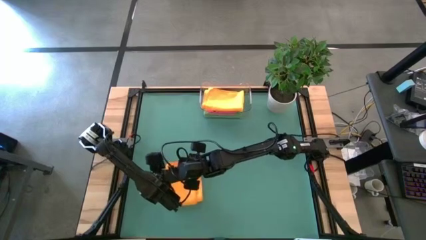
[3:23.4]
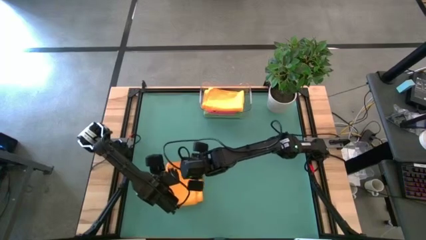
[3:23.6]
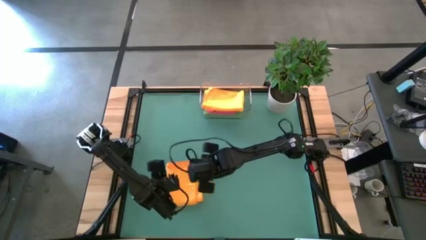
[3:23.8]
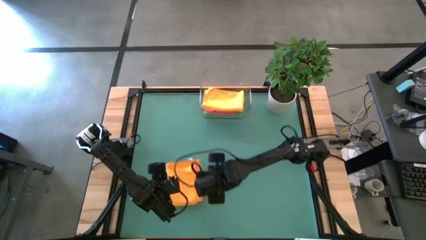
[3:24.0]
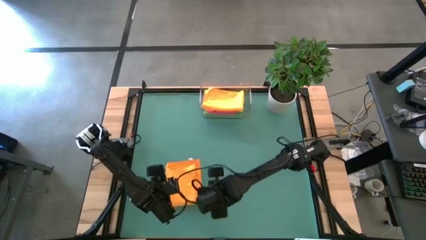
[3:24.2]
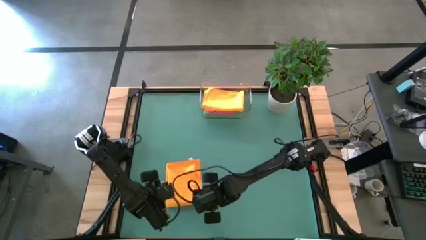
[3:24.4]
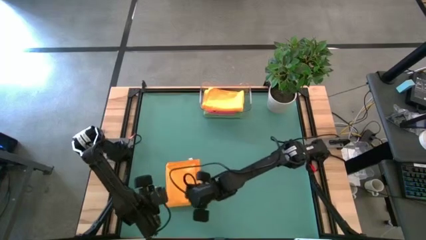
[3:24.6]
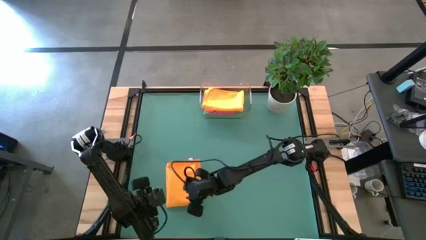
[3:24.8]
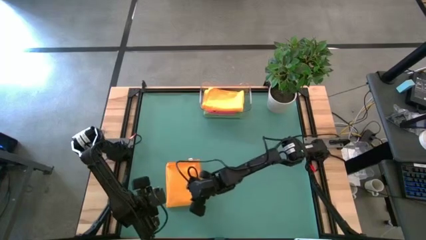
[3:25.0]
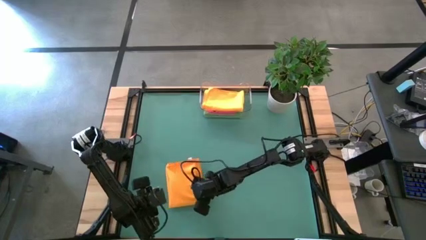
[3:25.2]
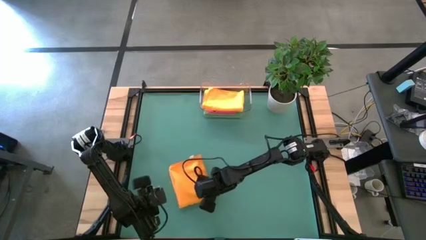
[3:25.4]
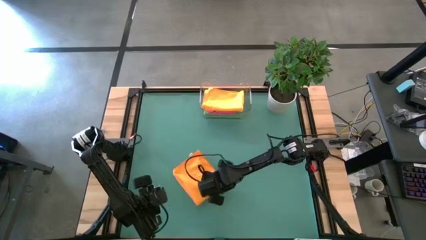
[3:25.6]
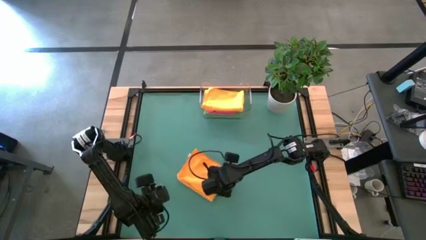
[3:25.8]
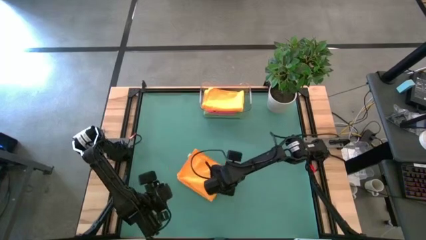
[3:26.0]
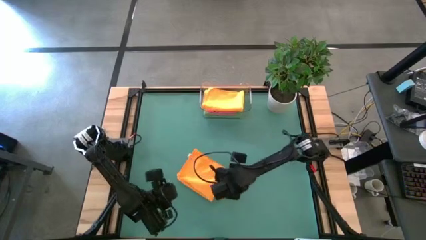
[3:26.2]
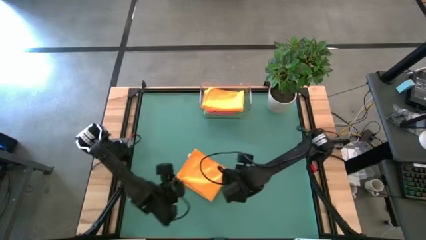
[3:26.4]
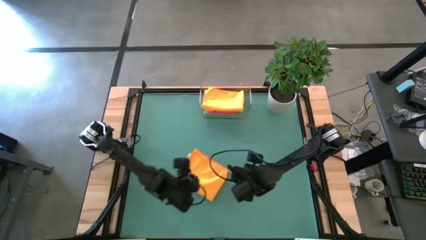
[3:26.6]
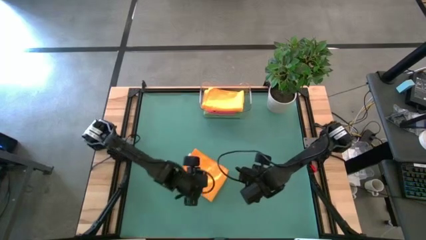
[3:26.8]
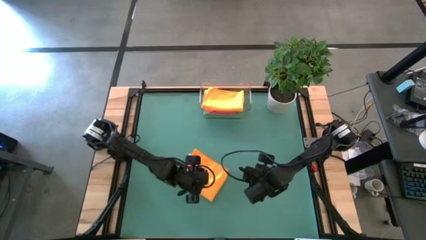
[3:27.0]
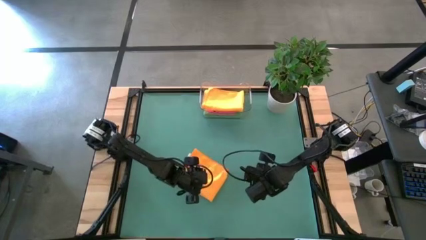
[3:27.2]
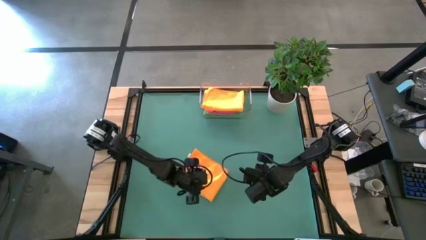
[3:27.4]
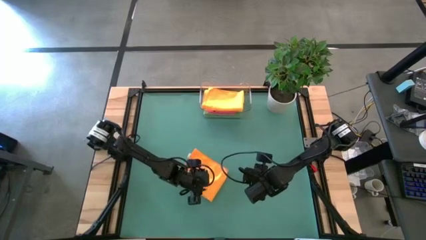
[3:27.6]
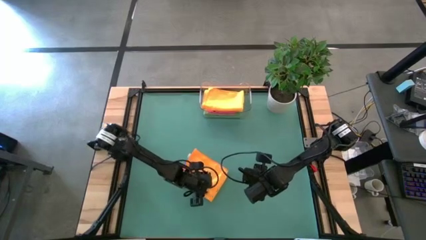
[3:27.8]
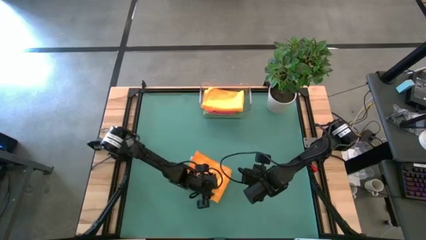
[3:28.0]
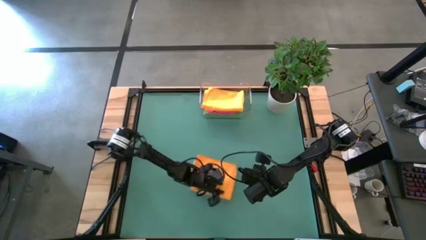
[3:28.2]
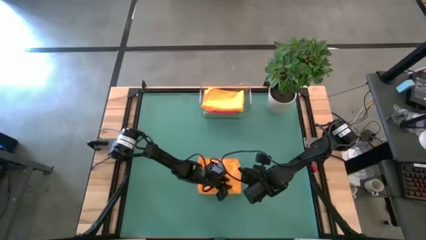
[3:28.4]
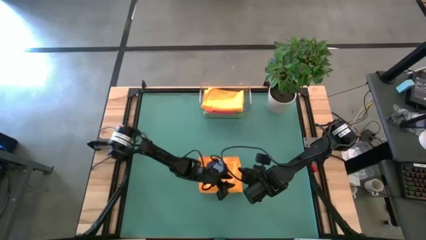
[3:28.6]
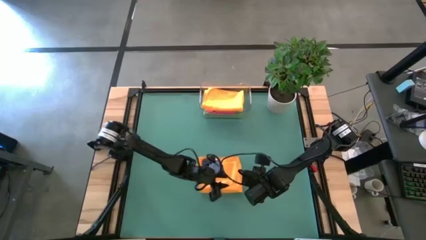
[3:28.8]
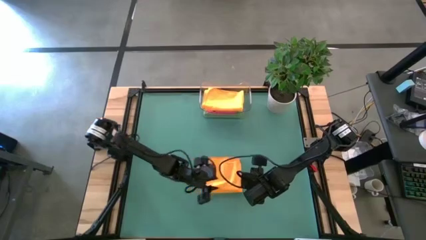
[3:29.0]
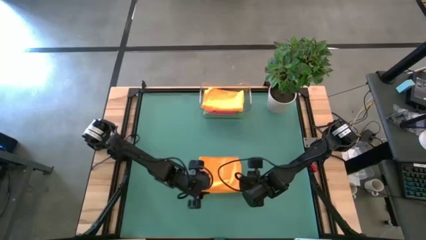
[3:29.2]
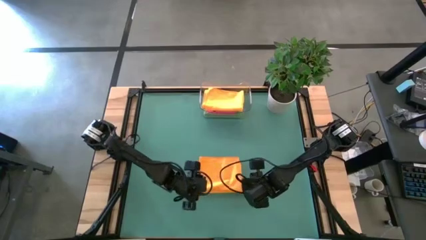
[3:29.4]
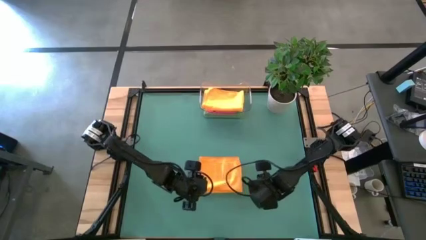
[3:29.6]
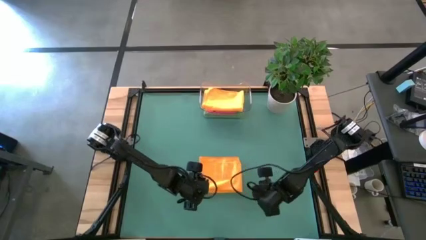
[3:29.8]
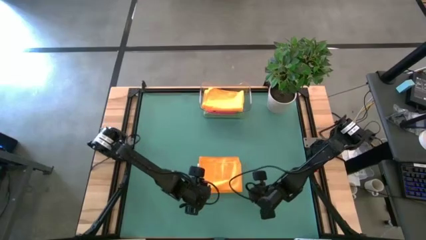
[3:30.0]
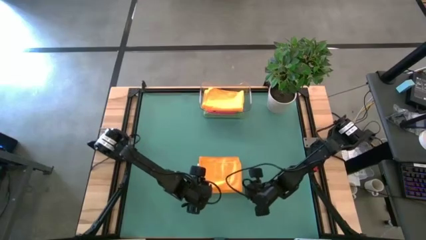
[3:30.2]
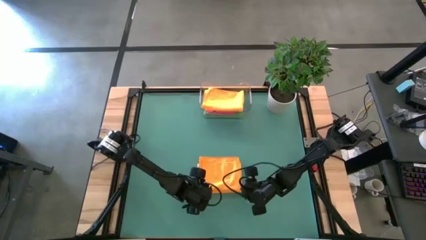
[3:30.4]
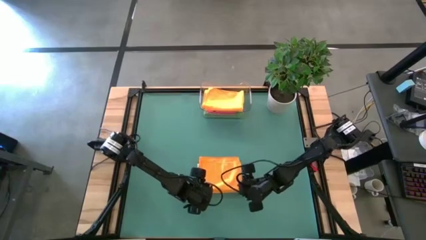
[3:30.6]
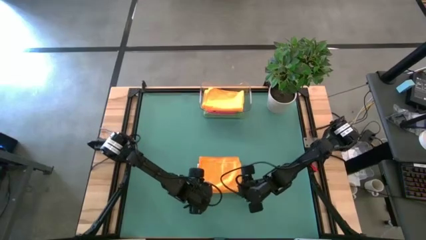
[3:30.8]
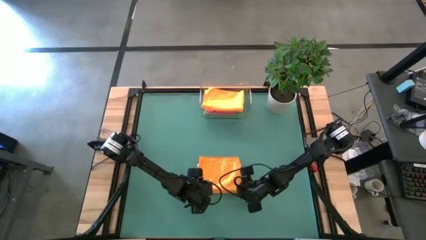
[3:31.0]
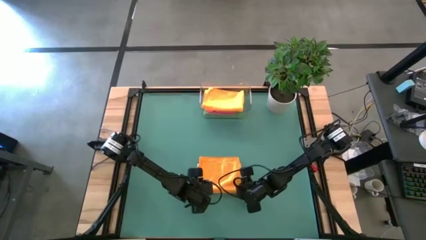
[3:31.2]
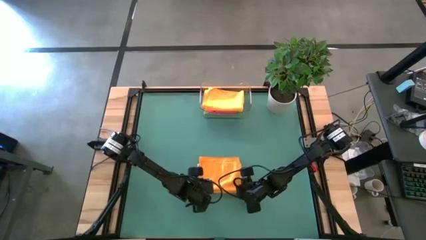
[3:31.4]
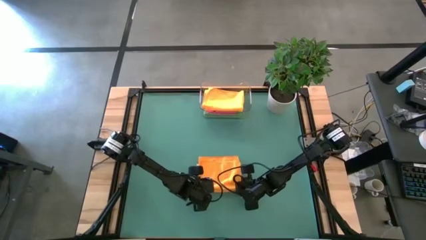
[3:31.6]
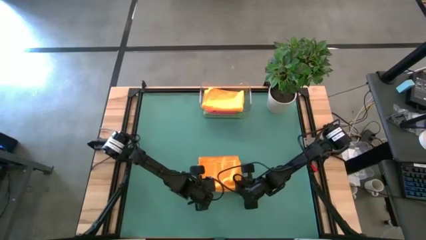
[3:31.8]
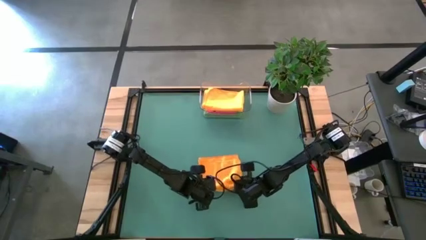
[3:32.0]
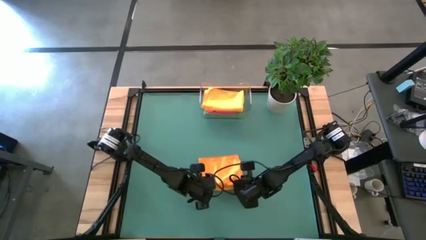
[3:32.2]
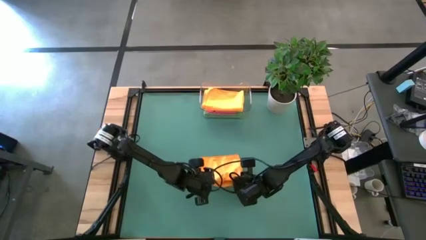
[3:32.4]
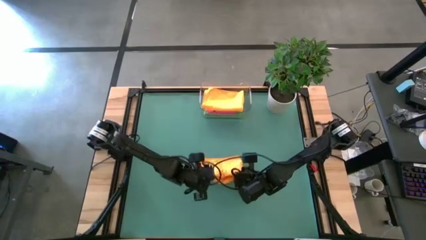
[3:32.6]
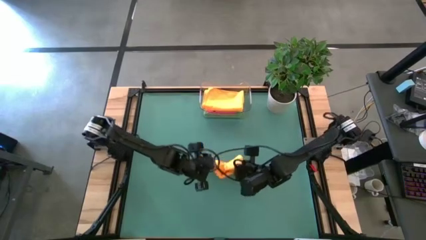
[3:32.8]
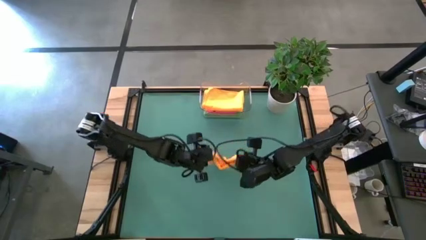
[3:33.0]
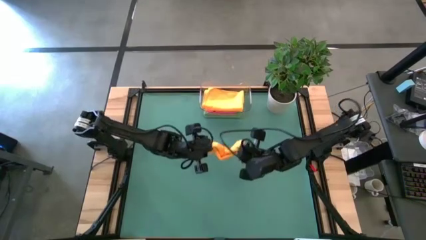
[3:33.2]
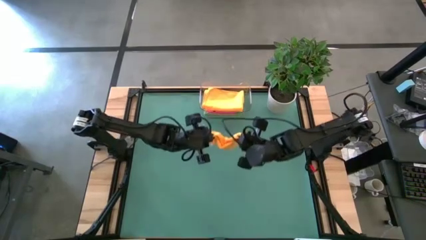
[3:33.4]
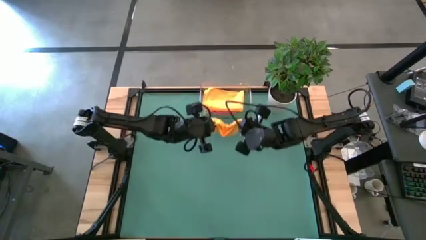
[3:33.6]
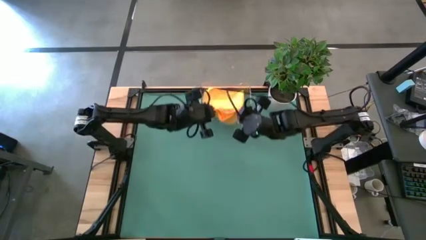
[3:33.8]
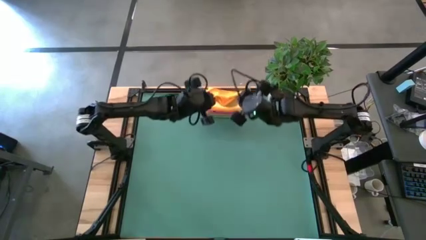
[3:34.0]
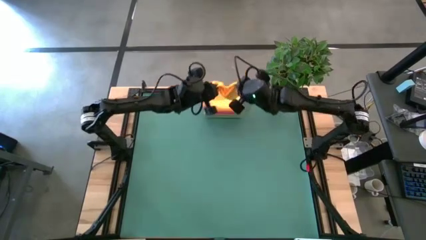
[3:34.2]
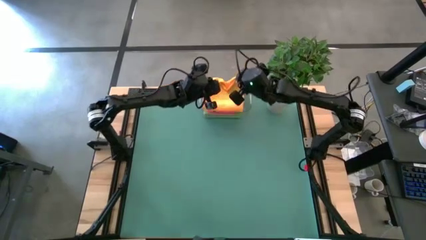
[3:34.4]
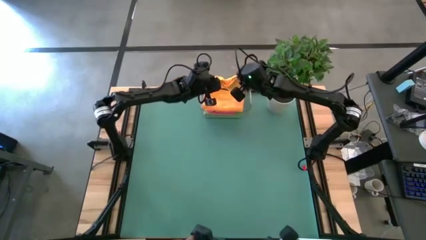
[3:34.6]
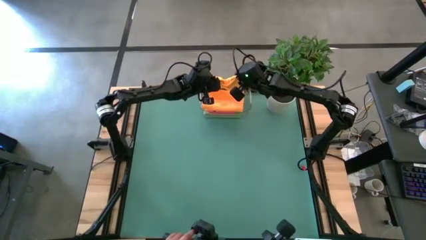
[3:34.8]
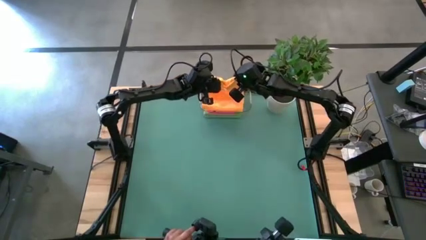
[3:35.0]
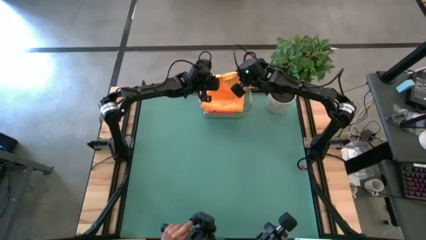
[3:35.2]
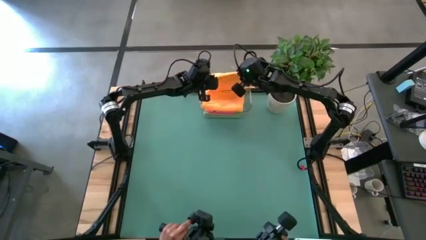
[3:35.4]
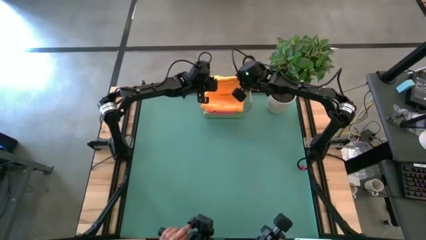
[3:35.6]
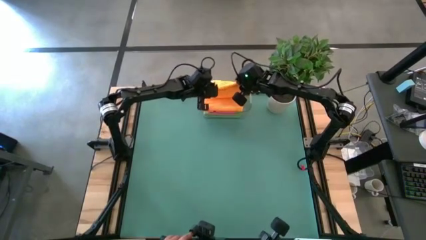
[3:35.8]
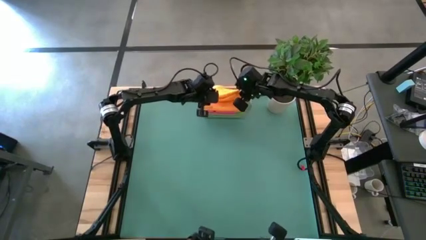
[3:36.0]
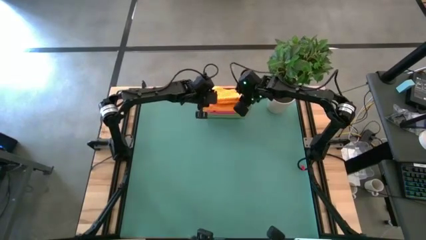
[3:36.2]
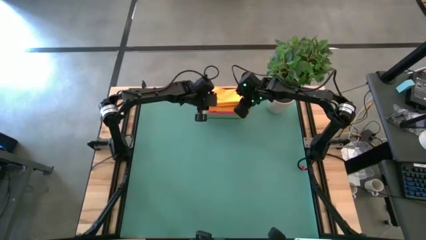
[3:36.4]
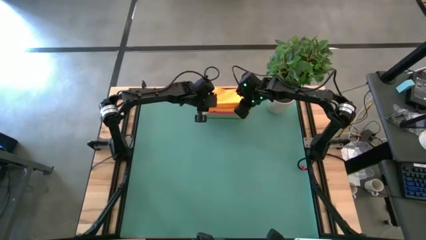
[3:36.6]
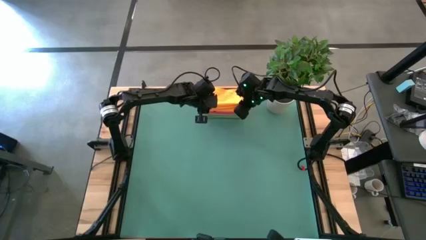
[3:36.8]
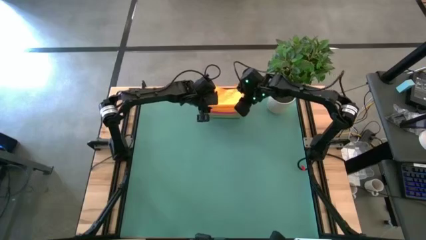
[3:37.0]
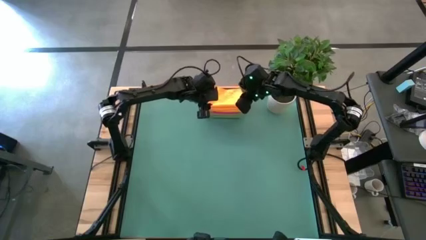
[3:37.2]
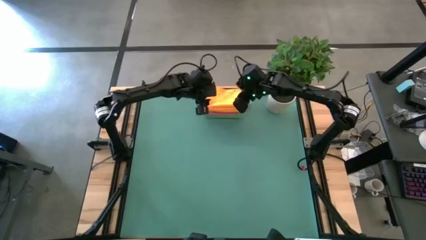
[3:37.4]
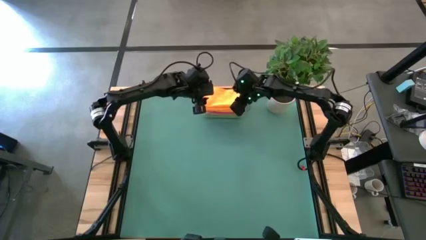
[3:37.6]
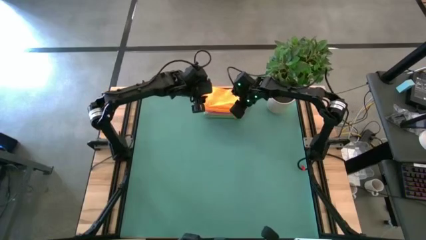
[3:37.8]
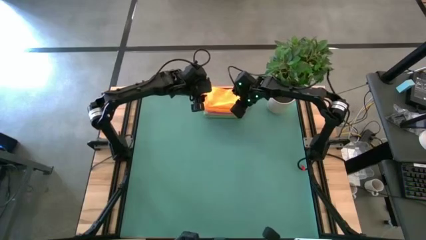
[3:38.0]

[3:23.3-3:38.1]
Task: Fold microfiber towels
Put the folded orange towel into the transparent bin

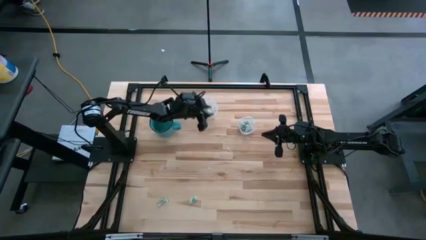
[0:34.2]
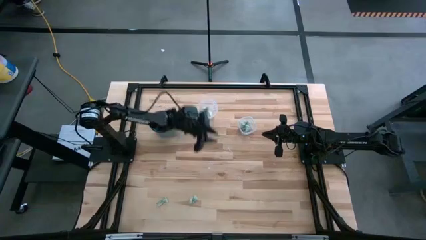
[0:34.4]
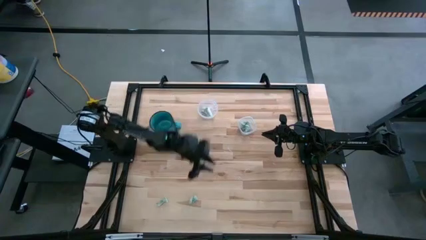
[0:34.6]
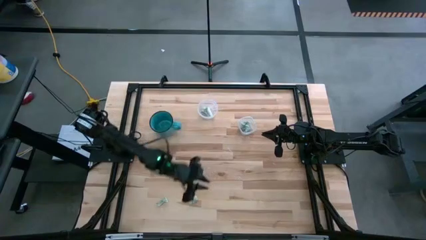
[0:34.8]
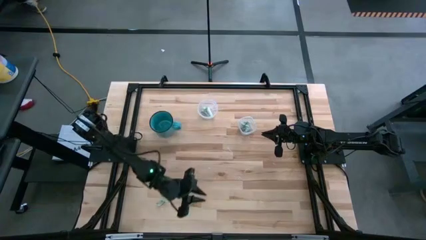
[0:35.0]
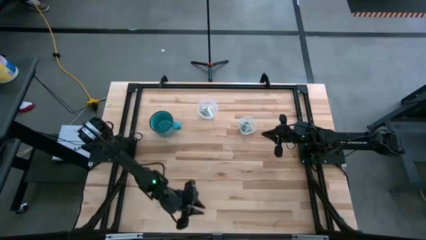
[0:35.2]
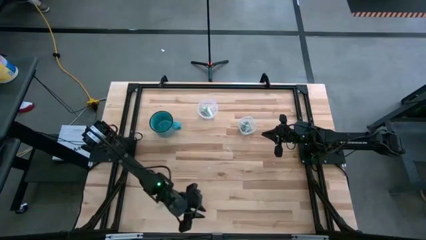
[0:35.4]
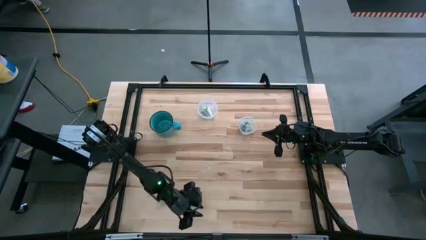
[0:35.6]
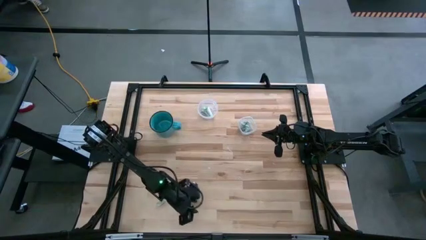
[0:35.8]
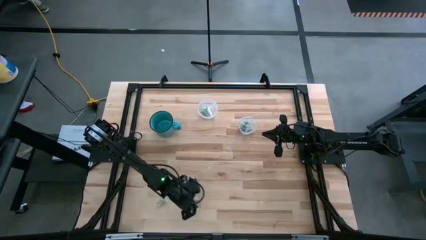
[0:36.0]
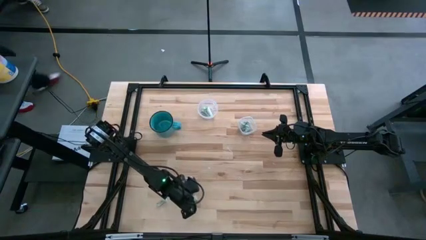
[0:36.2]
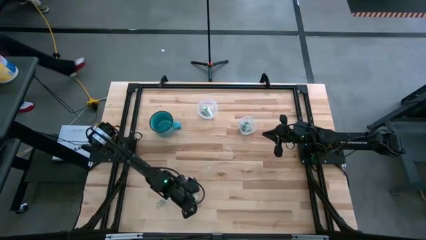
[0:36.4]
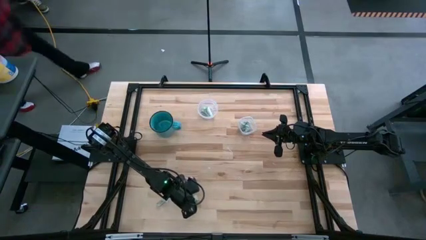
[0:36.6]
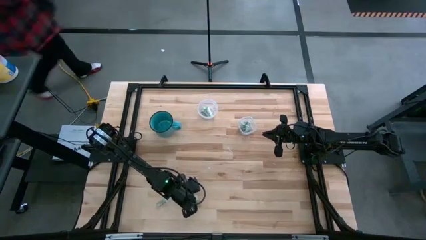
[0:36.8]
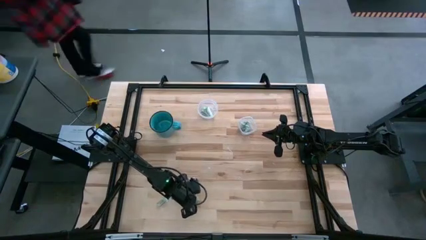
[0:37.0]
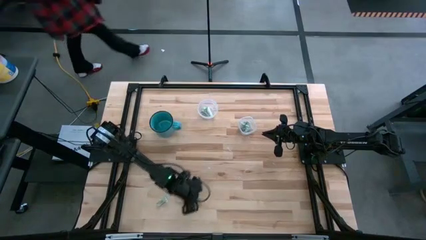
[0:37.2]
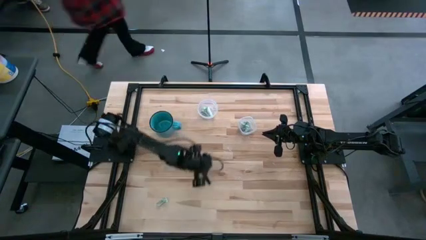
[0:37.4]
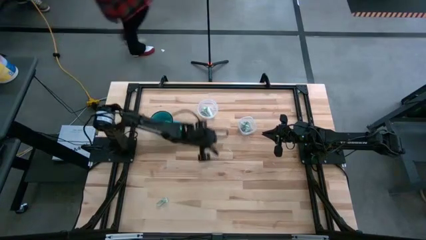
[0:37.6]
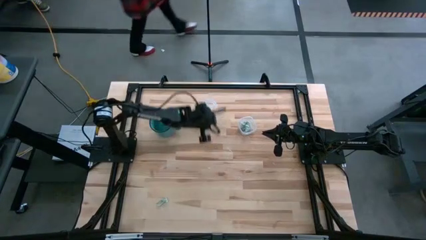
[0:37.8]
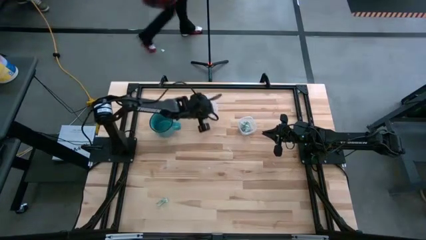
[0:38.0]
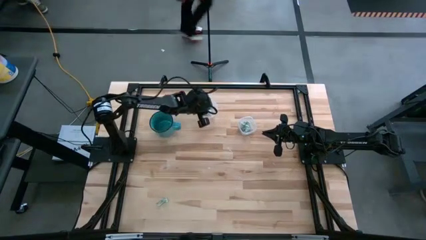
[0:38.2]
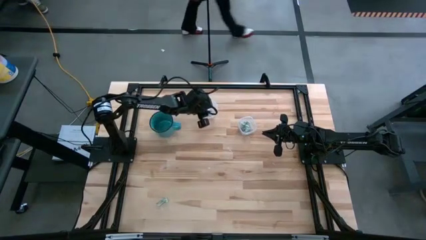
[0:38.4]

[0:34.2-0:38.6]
Task: Pick and place items into bin
Put the stevia packet into the large transparent bin
